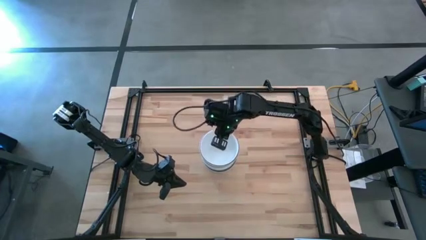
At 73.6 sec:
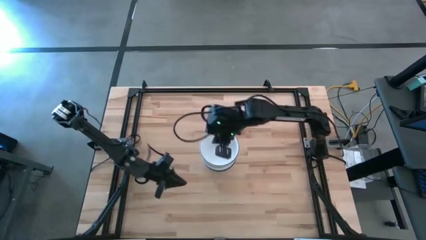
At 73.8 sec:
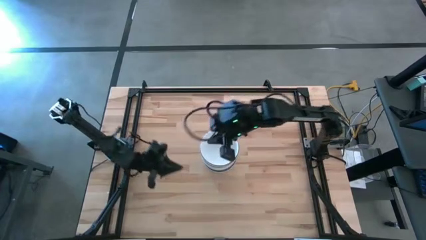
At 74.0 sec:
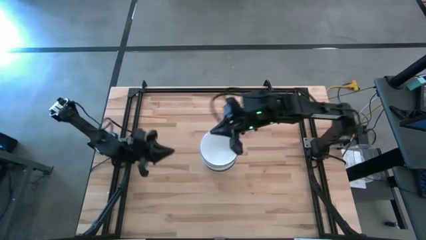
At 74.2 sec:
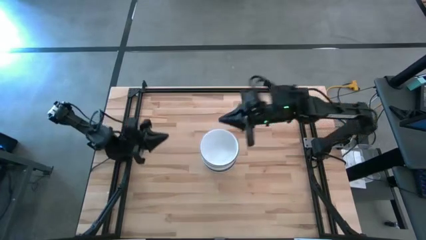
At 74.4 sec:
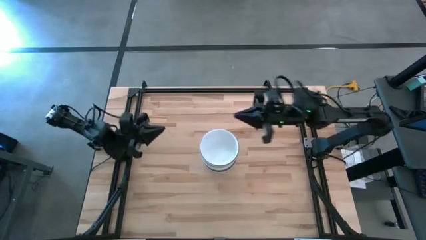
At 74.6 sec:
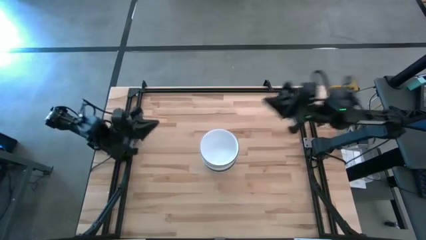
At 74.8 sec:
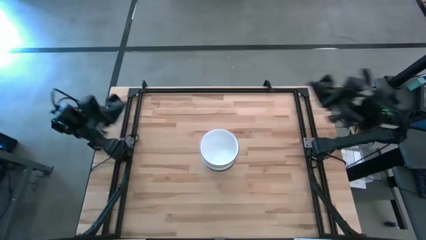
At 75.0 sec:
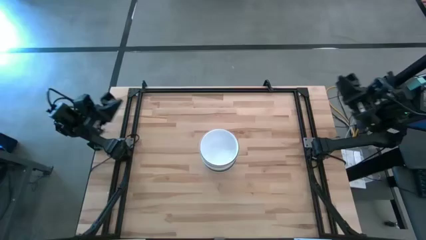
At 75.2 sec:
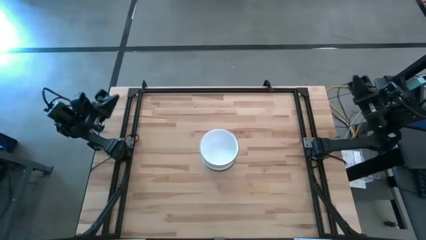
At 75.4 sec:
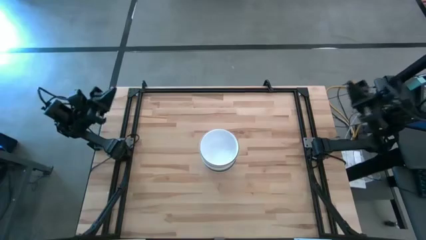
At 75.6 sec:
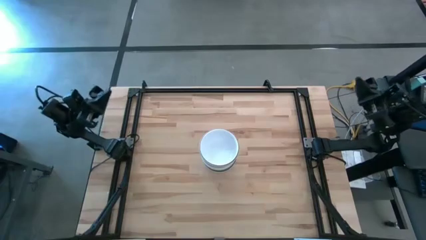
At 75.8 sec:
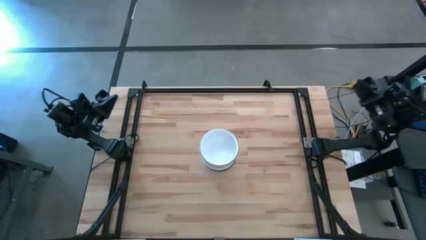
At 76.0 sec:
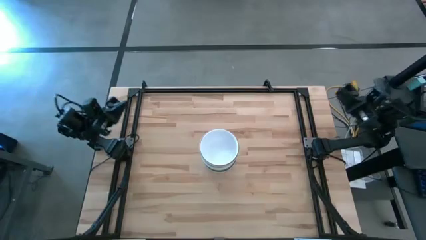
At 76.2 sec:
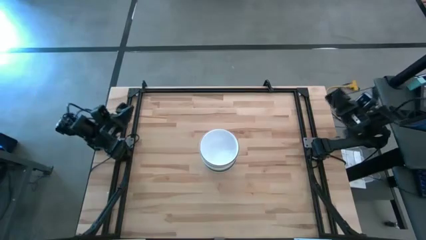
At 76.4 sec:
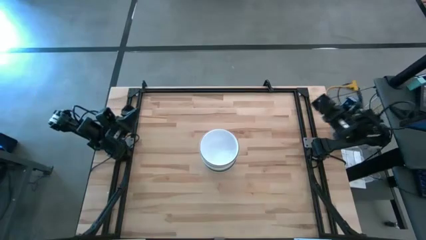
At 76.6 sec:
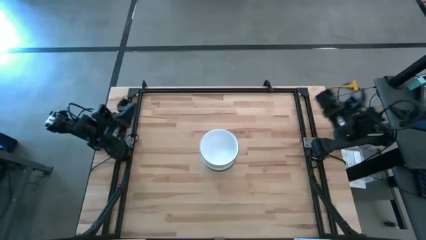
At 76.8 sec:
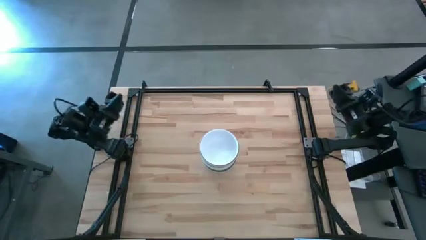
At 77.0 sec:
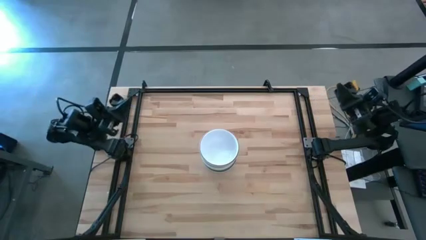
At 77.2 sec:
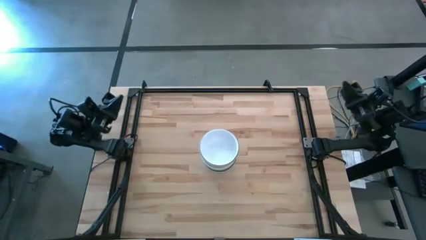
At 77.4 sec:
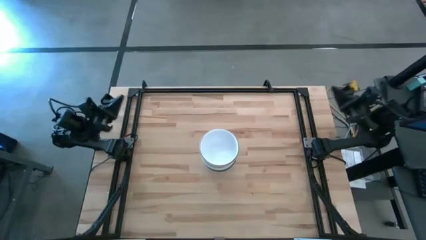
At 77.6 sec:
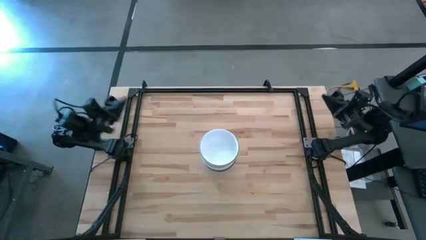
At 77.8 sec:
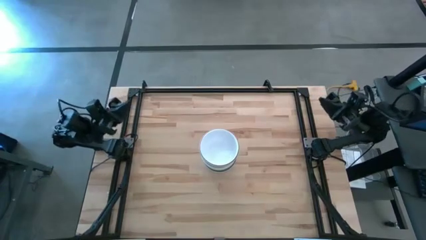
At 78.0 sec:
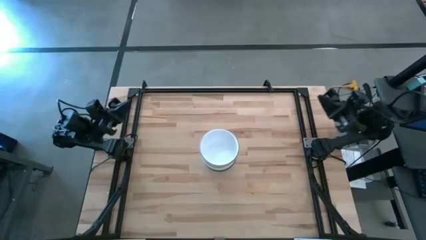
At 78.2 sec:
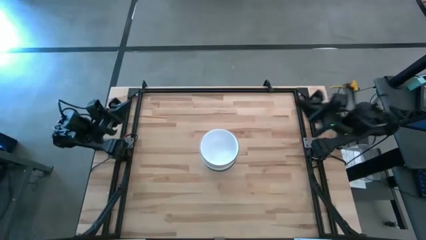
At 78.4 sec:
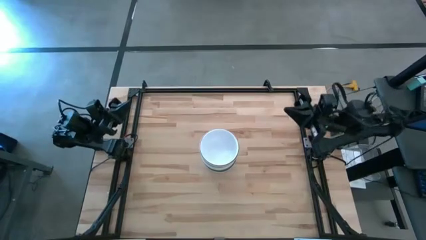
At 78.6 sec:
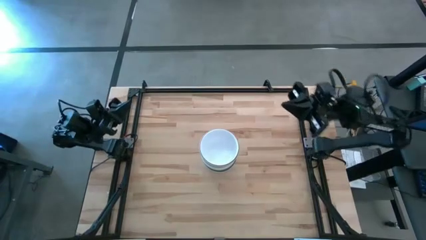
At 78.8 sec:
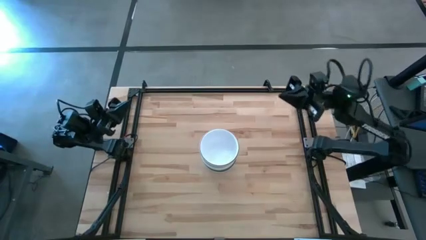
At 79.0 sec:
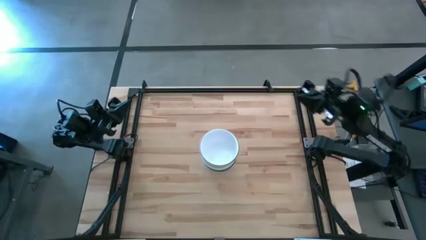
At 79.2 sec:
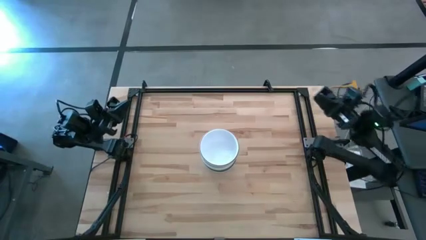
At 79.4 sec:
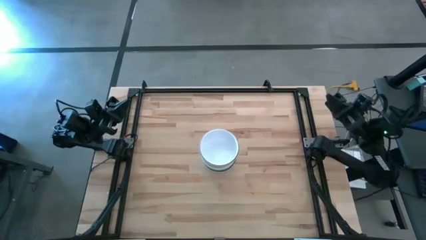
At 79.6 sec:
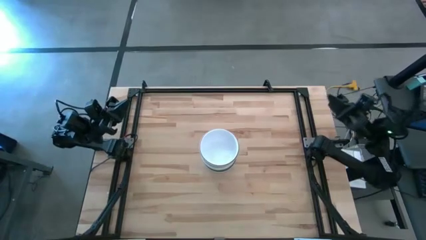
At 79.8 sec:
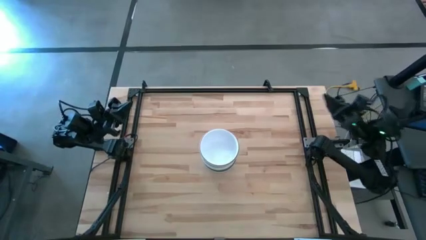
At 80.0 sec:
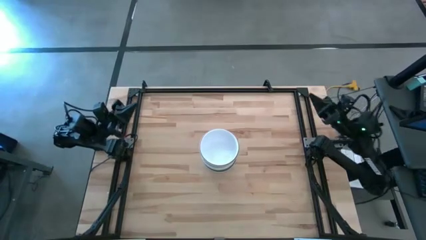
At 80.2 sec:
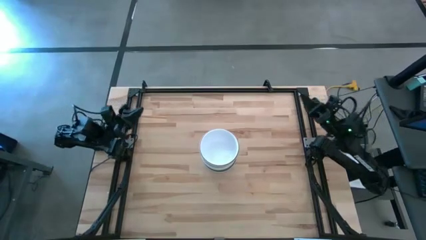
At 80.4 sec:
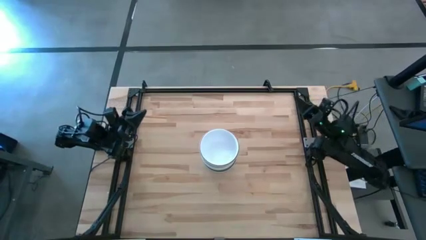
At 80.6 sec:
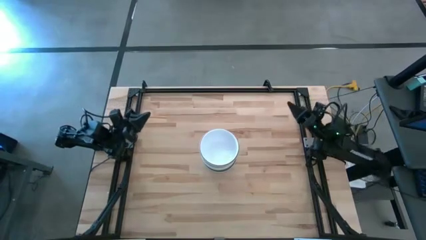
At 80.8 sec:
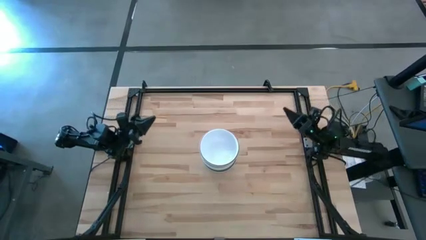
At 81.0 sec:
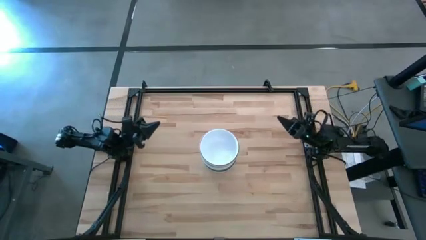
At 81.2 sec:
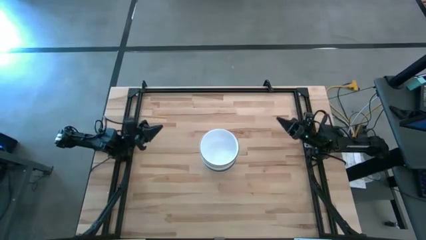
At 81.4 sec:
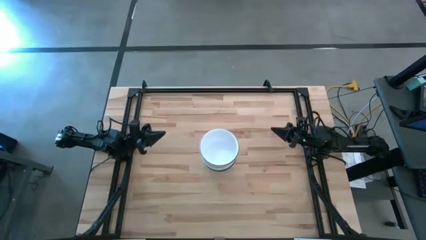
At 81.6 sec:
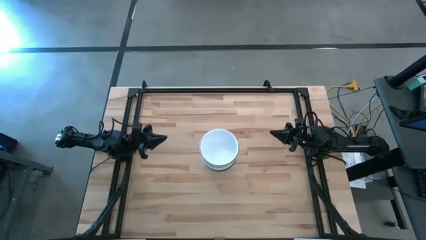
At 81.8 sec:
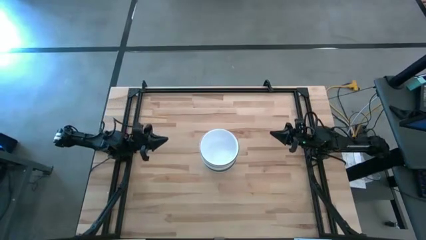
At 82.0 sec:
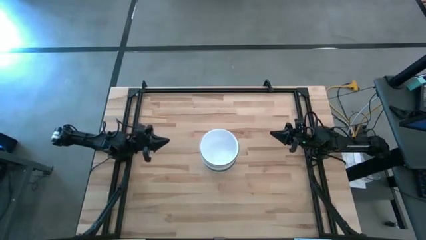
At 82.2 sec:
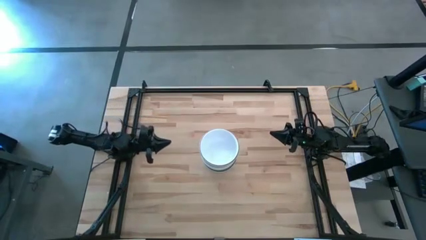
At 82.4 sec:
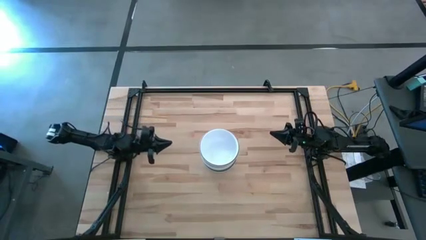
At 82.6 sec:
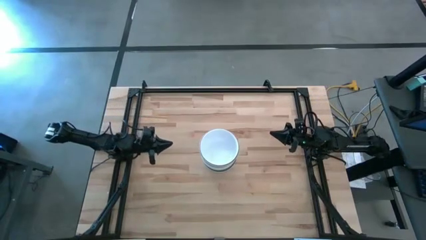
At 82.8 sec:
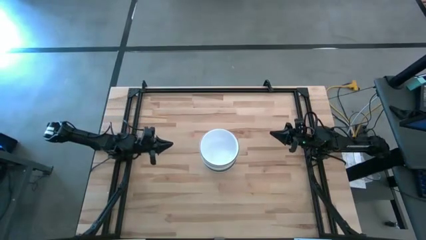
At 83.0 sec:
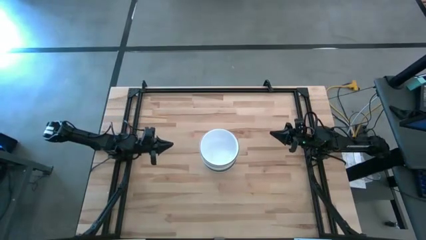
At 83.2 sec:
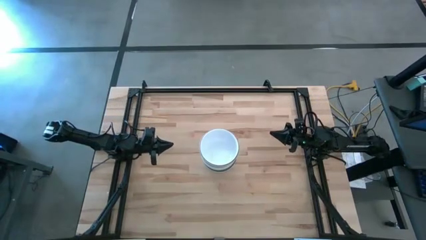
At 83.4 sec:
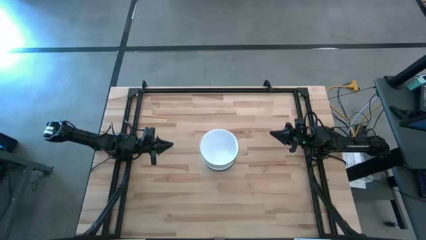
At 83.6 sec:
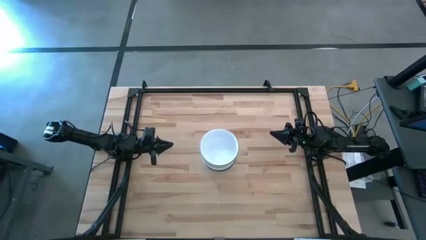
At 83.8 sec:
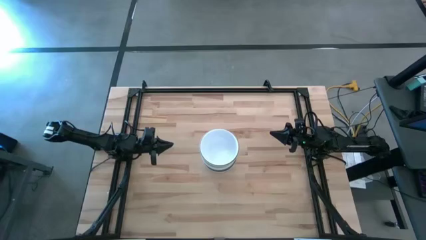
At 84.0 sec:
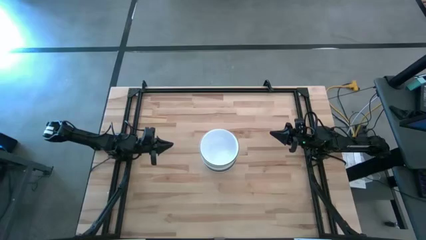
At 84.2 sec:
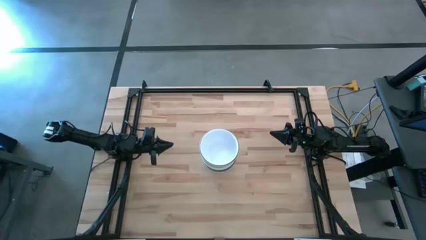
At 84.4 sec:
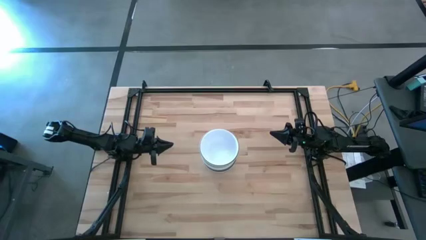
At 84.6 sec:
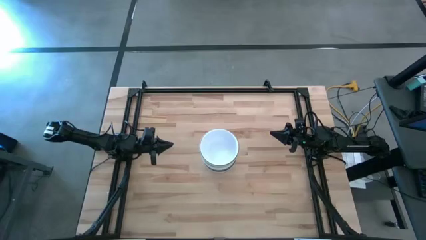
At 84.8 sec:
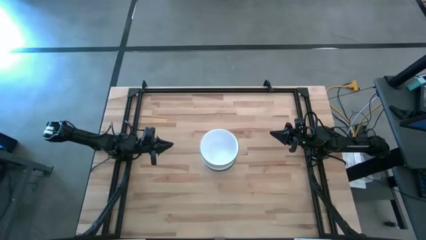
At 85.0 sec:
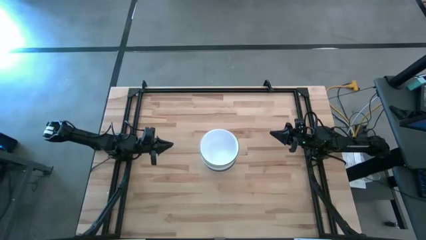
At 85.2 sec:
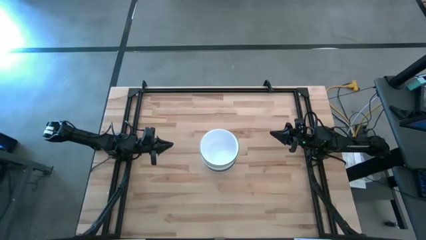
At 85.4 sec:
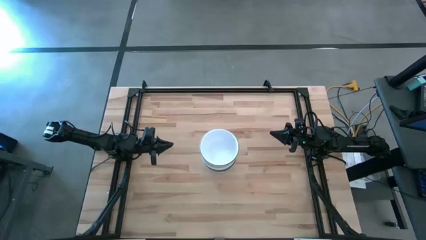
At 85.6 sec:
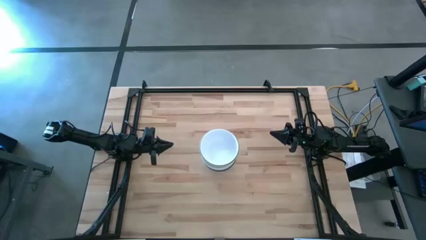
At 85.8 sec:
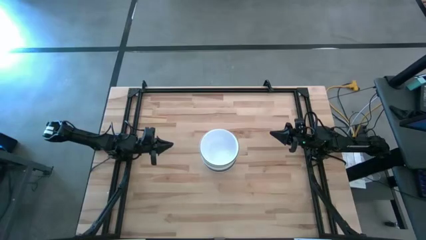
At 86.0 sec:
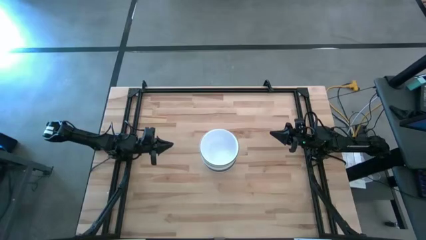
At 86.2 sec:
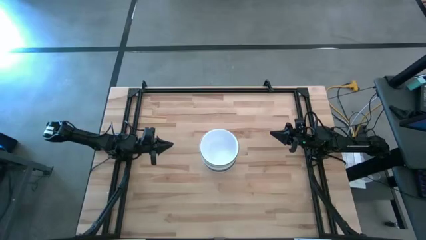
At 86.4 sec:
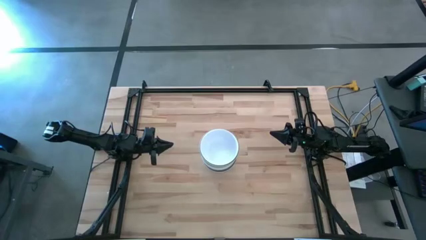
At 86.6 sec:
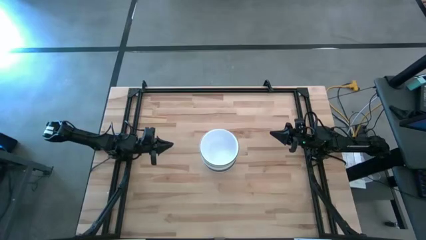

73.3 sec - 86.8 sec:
Task: Nest bowls inside each other
Return to Home Position
